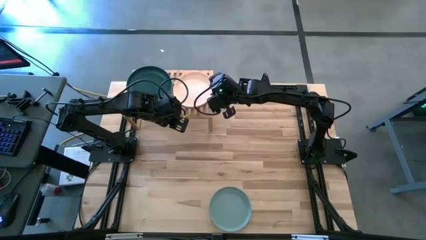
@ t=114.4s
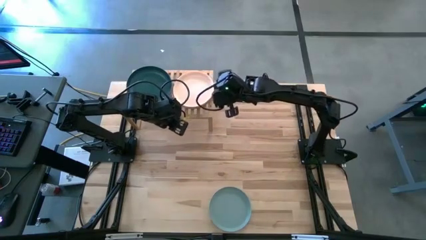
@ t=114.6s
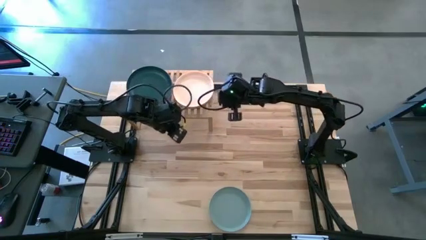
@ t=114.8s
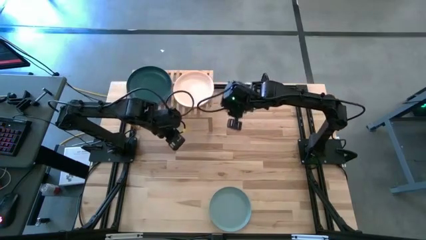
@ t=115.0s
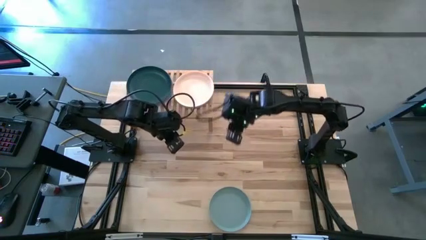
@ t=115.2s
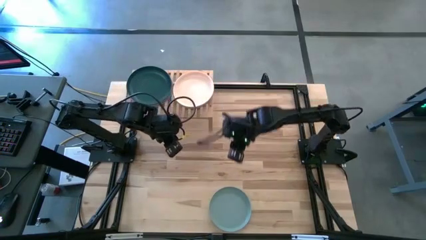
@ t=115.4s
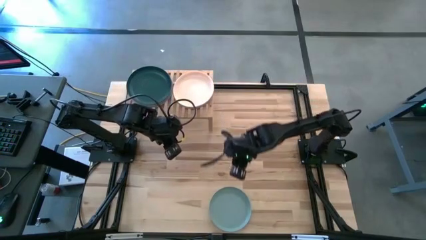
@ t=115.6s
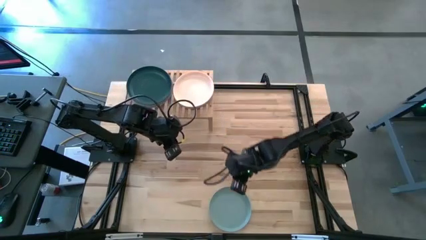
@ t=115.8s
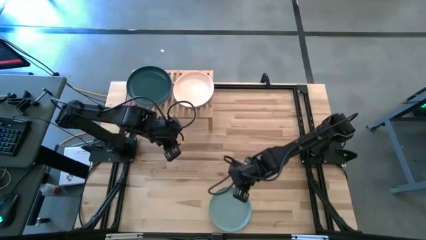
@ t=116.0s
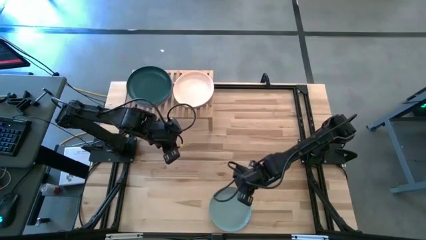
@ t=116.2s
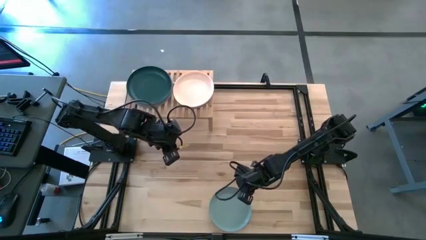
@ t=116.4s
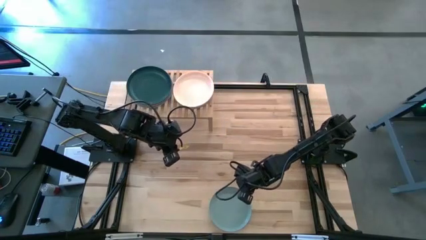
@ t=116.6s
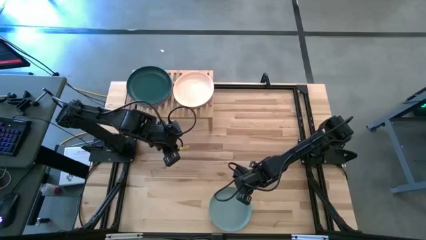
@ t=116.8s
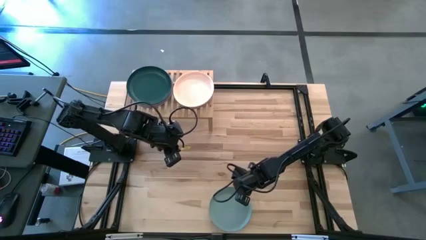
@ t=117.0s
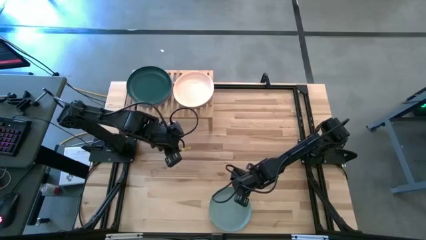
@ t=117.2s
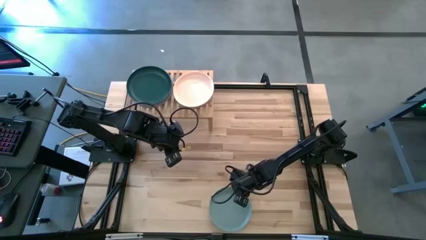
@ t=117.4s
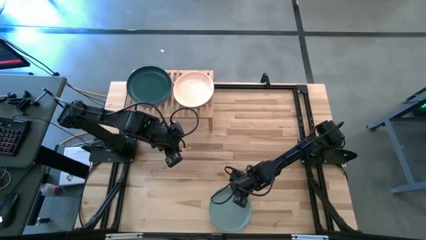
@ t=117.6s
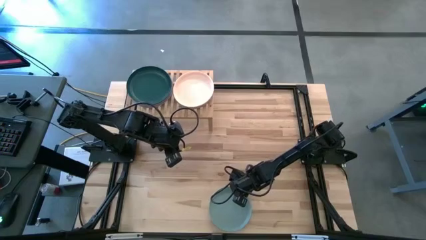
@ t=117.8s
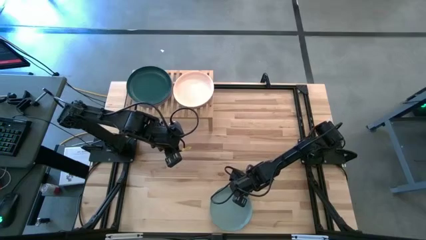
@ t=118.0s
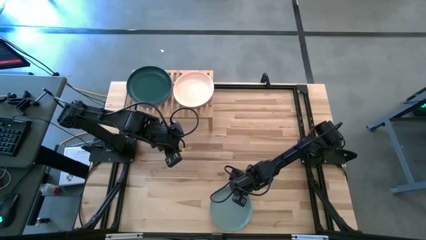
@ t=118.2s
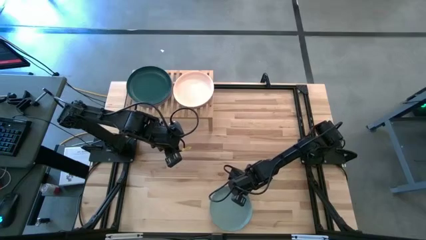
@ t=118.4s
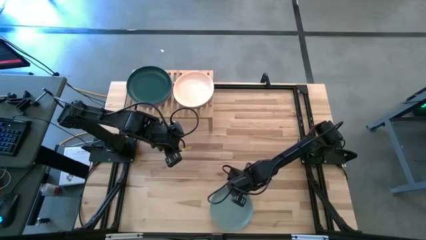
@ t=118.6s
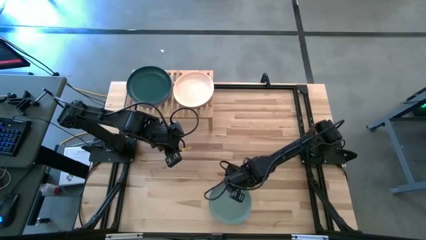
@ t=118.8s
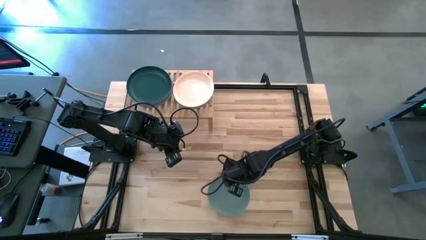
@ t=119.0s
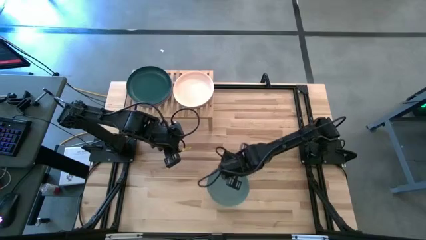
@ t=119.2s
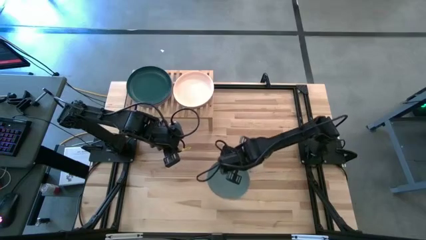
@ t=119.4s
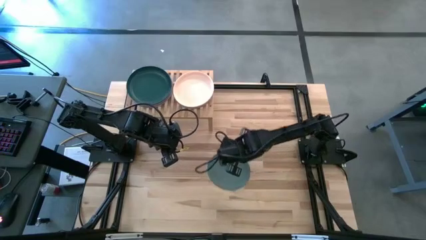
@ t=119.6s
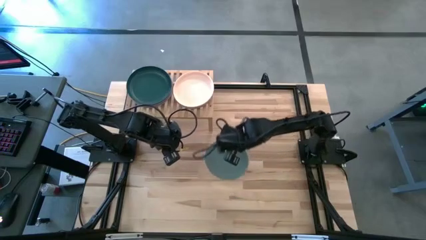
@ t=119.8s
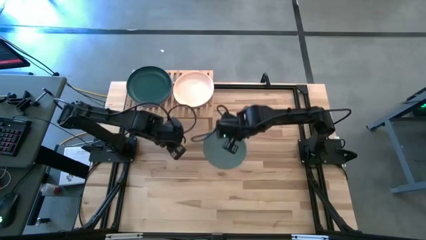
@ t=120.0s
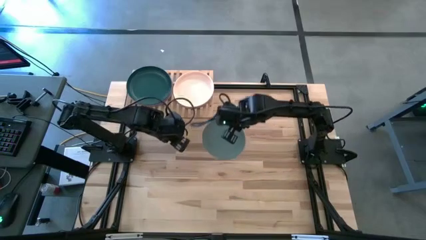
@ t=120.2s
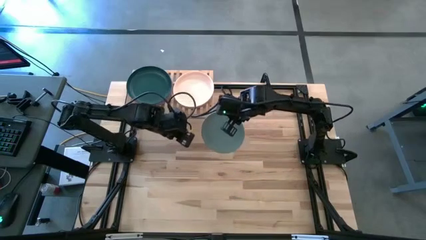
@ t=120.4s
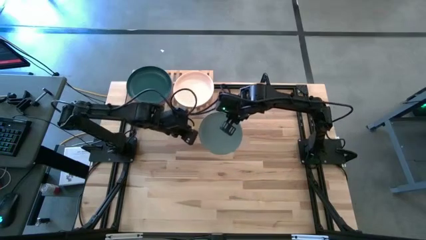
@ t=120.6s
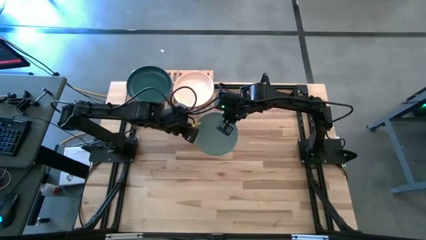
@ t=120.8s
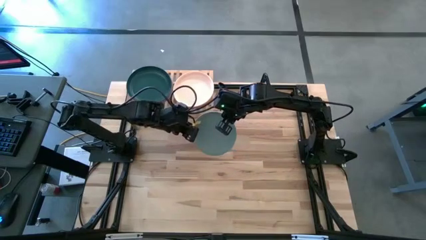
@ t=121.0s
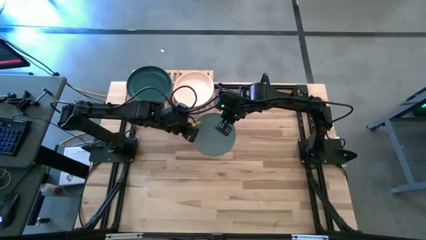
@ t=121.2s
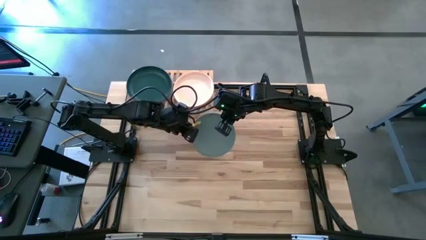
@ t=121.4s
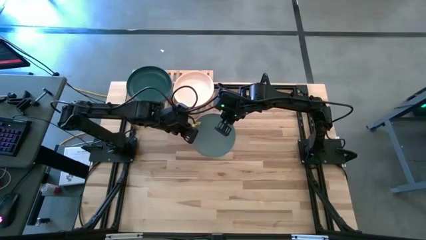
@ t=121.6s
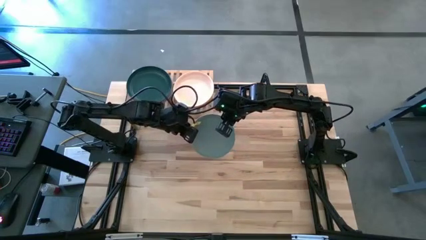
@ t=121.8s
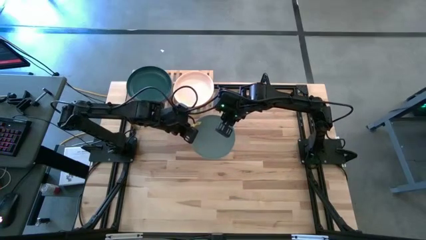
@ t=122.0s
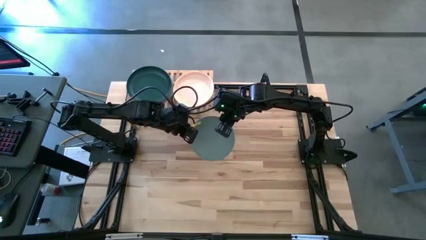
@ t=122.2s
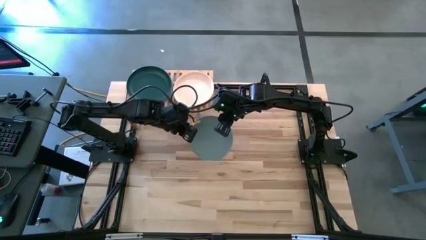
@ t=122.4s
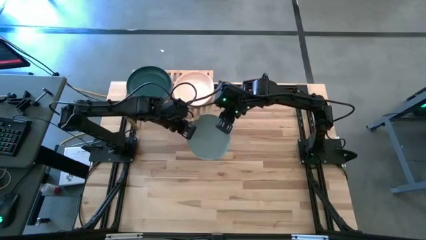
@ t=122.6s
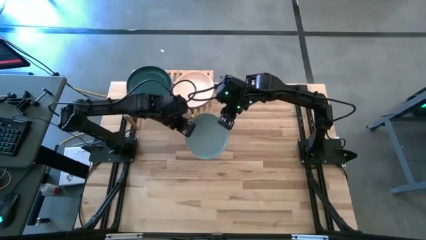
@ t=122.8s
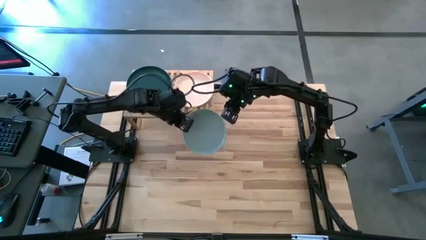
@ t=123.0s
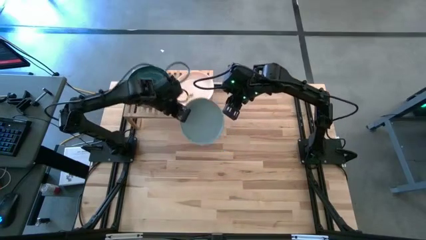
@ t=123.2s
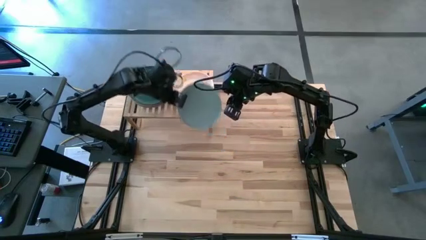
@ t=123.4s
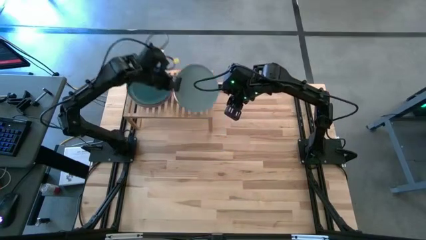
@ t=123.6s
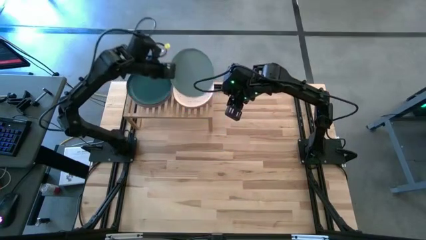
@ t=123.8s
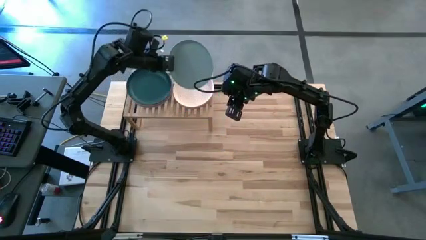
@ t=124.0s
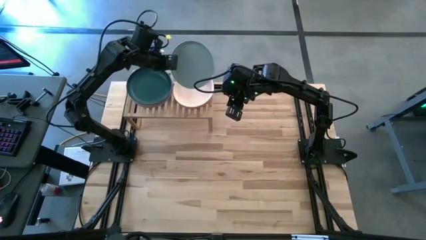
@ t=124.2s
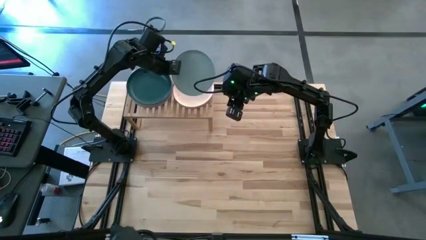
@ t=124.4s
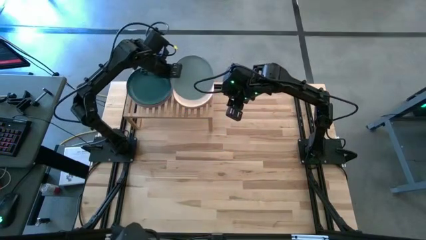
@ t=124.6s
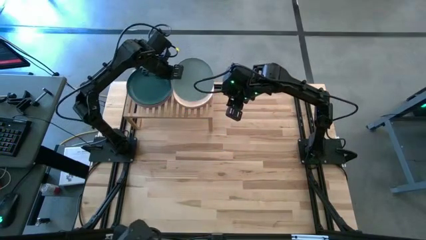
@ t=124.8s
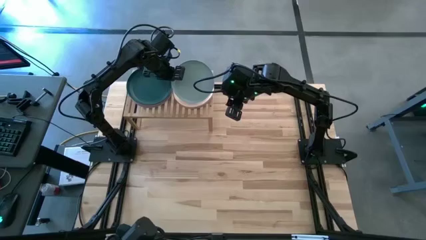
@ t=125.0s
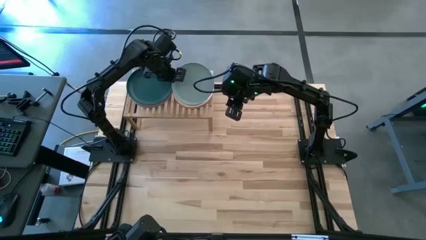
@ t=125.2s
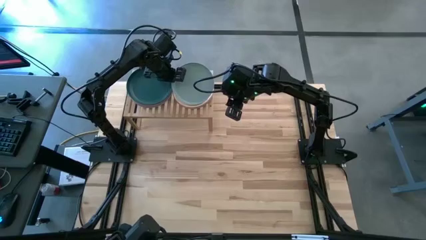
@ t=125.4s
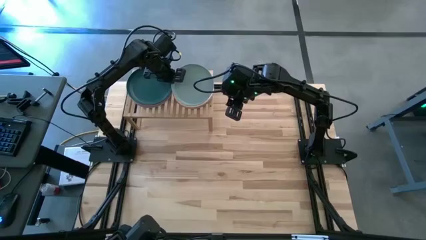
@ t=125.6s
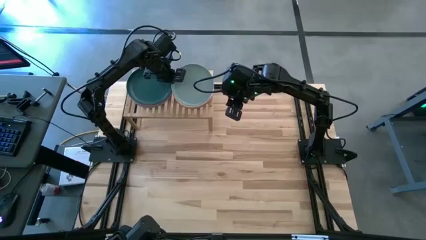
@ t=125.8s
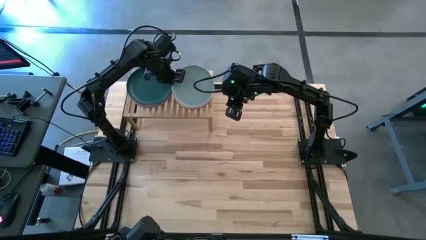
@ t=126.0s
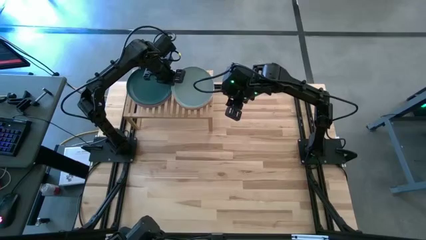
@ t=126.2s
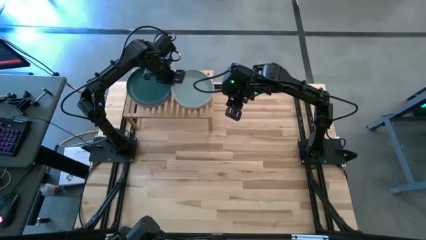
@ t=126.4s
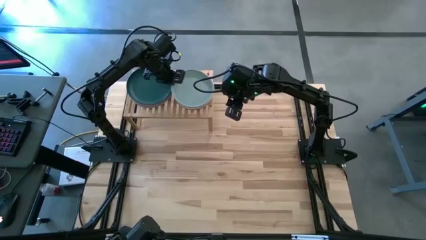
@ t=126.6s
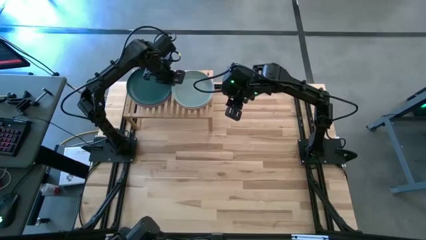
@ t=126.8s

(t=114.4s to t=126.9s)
Task: Place and stack plates onto a shelf
Stack the blue plate on the top of the white plate
